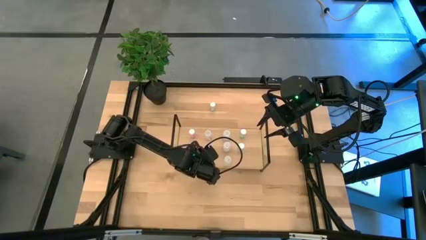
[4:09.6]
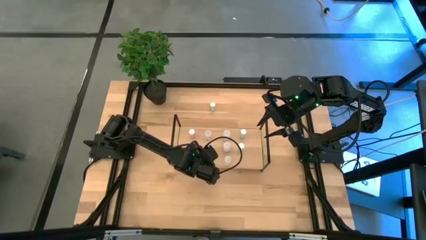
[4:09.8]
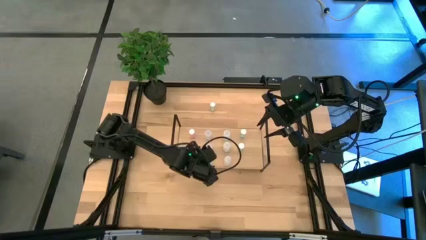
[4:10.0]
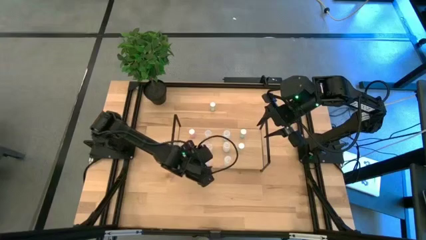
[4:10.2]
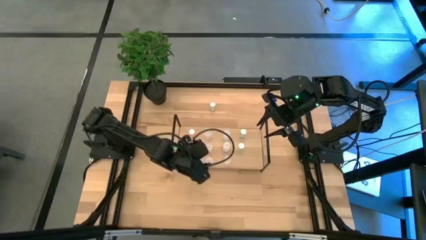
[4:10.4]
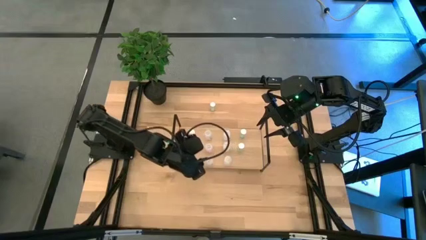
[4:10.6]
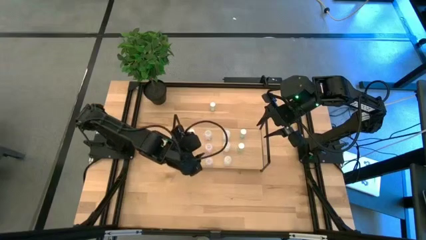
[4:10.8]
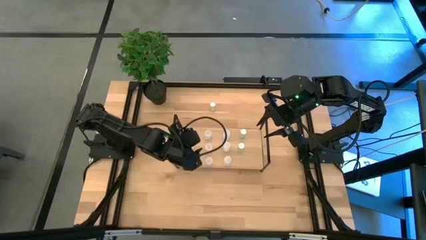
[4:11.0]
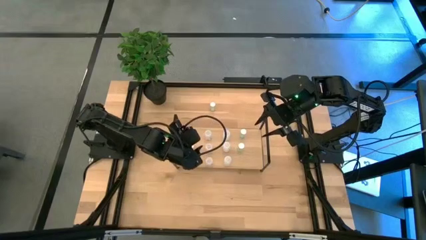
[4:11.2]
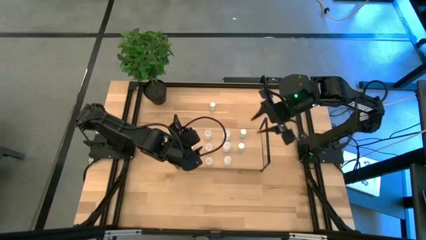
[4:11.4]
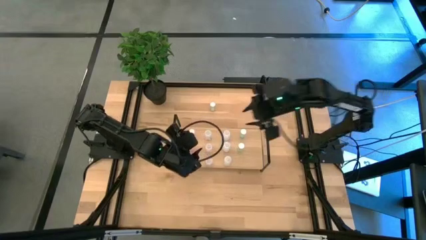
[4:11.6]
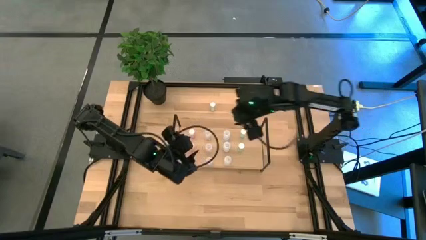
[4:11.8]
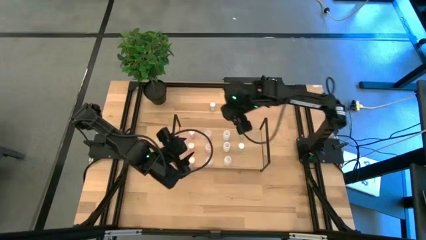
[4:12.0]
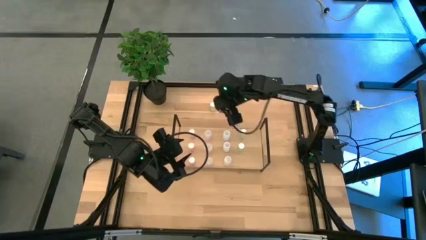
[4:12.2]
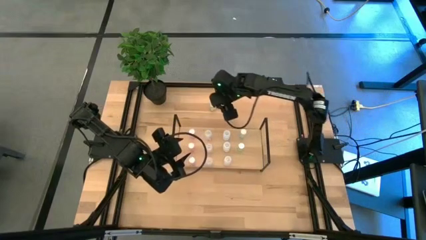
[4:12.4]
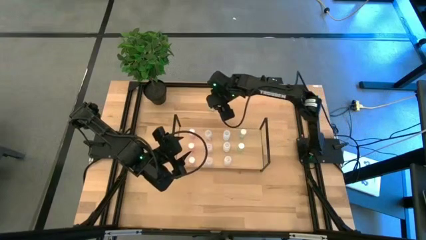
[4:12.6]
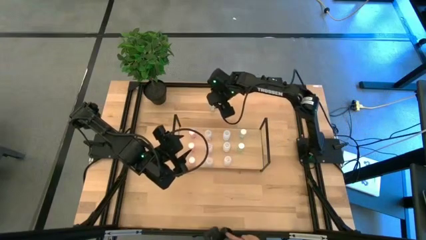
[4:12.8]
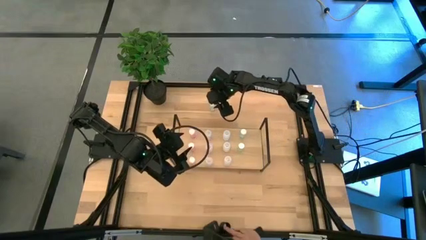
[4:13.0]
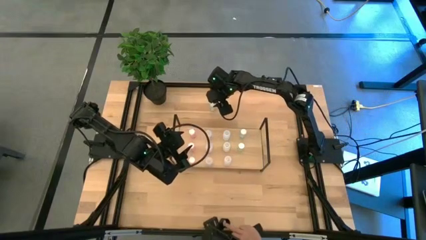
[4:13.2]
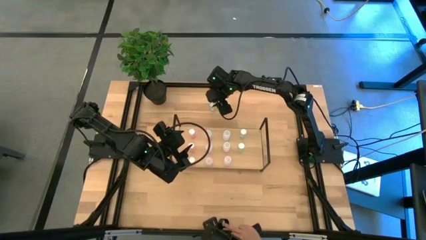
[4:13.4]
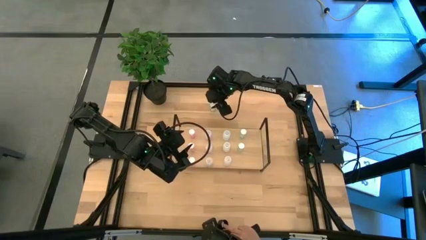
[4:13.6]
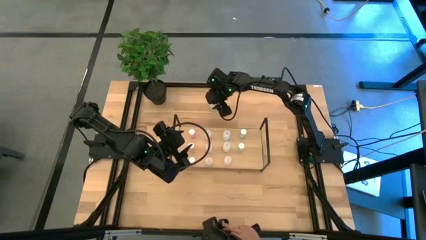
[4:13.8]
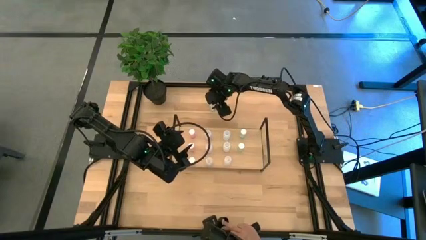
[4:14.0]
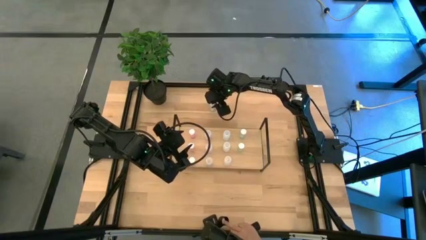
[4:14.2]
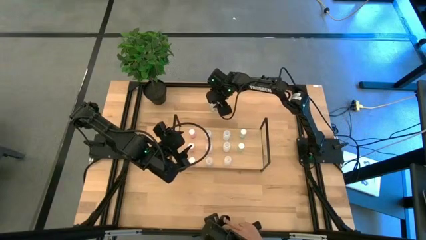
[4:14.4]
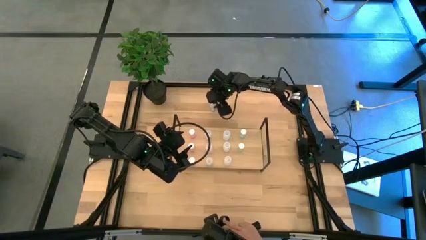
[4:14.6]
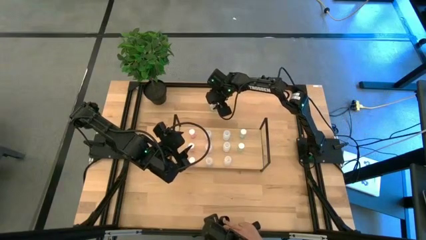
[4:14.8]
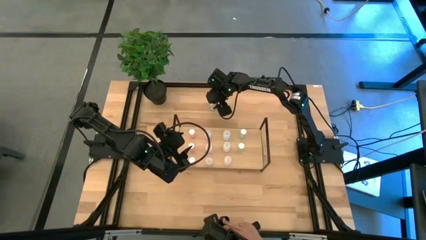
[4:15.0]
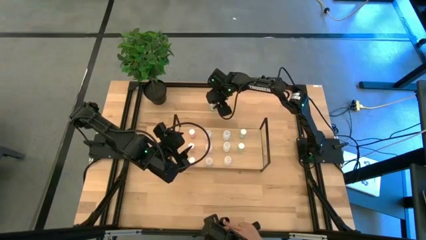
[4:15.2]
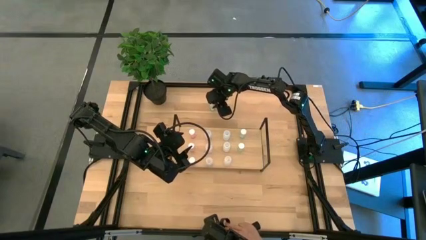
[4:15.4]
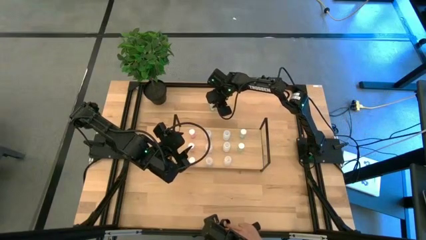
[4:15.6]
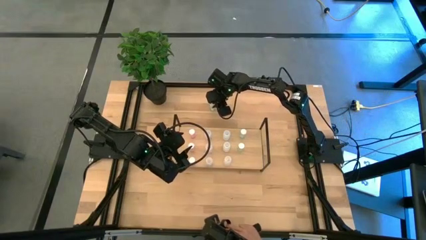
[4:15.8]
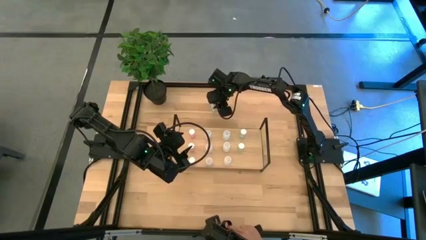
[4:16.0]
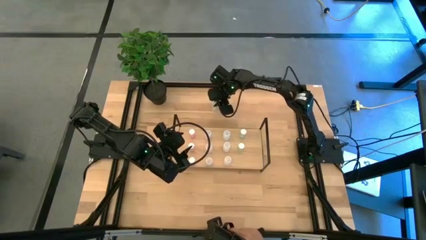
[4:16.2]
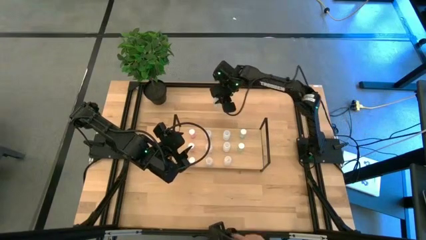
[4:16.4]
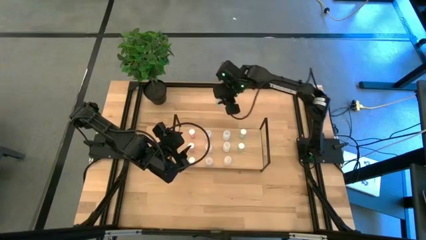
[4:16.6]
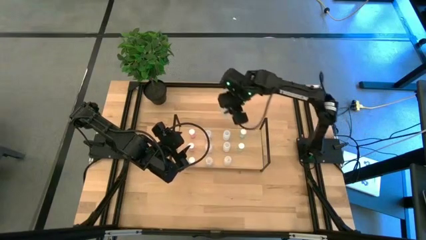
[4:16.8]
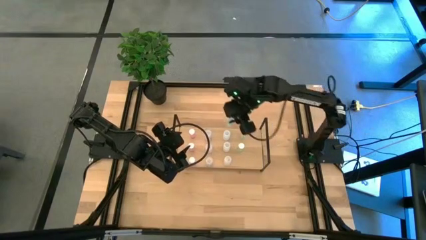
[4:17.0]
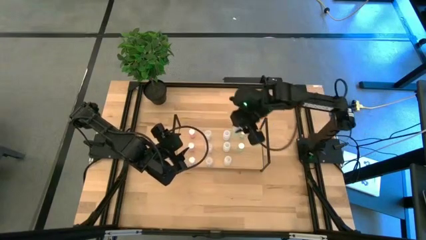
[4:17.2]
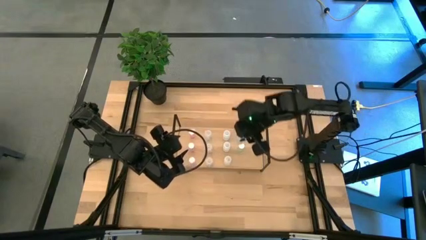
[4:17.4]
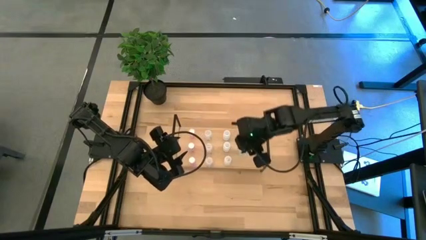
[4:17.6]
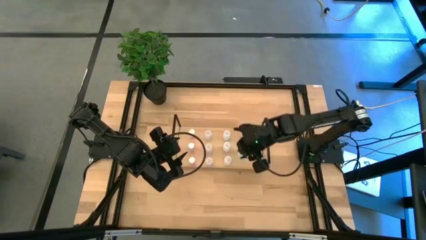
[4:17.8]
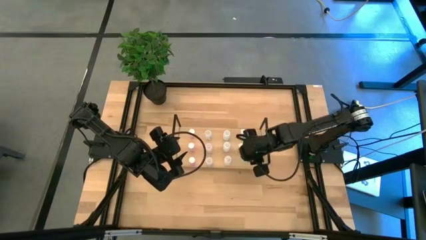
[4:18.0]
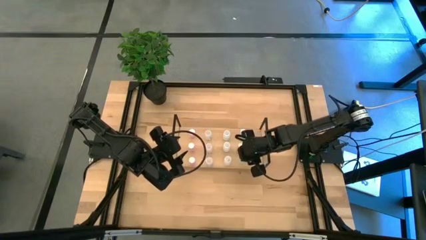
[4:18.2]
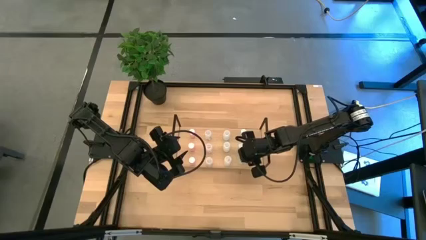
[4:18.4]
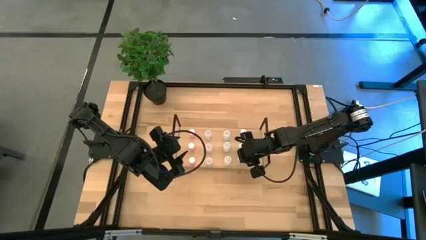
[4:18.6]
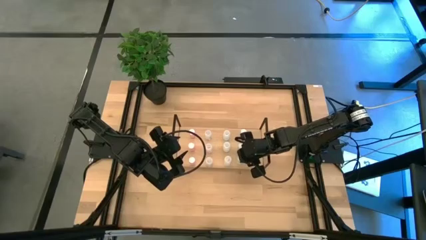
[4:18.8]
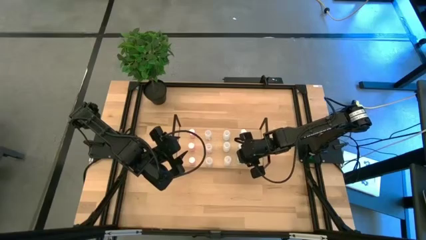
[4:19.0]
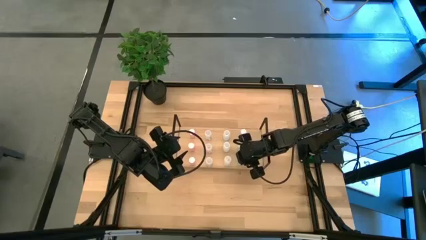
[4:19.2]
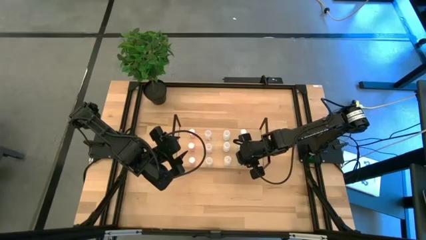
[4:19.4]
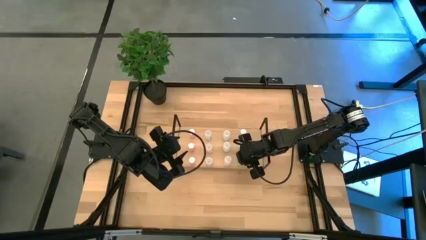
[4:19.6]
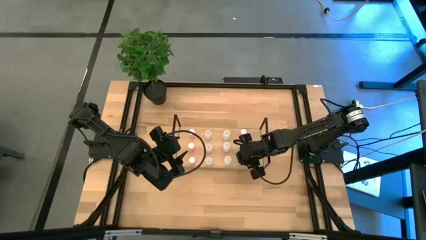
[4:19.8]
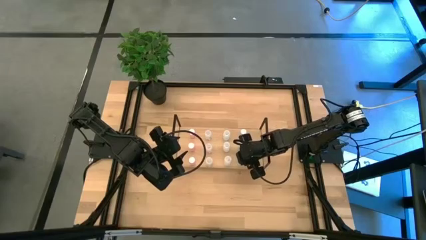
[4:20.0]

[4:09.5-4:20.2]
Task: Pick and place medicine bottles onto shelf by color
Put the blue pill bottle on the shelf aligned with the other blue pill bottles

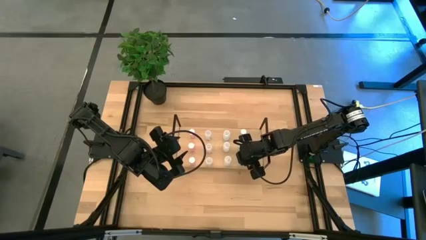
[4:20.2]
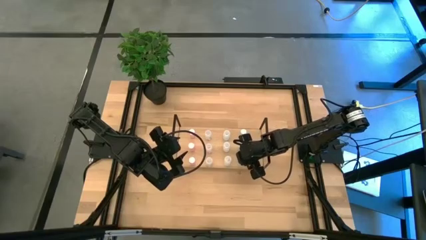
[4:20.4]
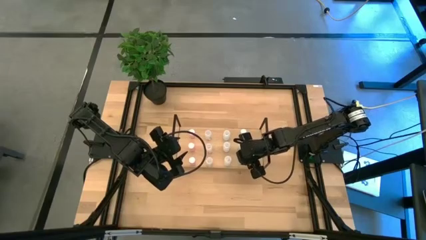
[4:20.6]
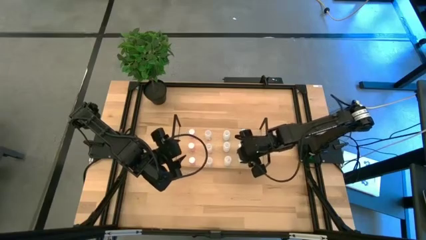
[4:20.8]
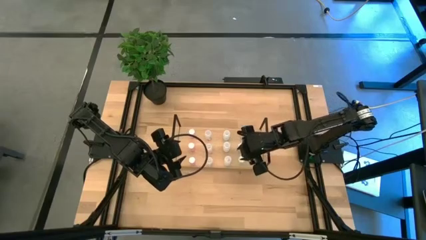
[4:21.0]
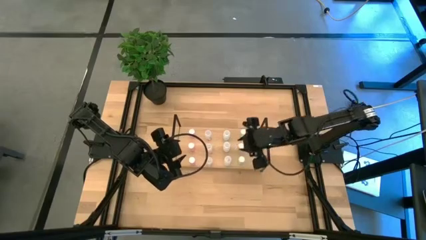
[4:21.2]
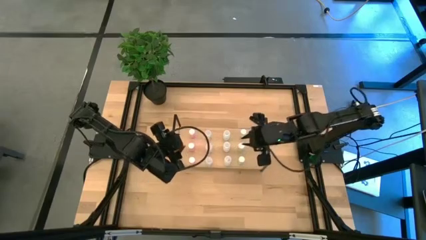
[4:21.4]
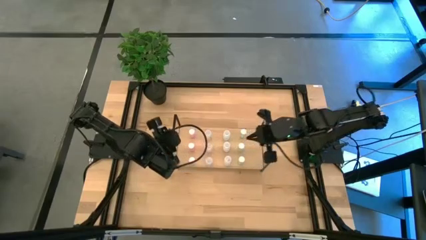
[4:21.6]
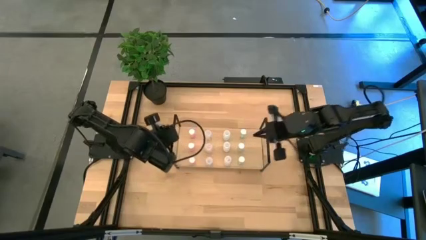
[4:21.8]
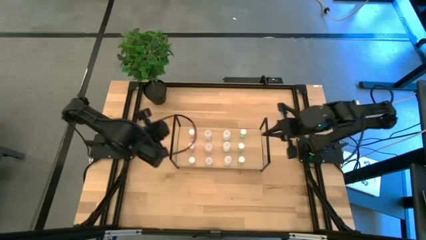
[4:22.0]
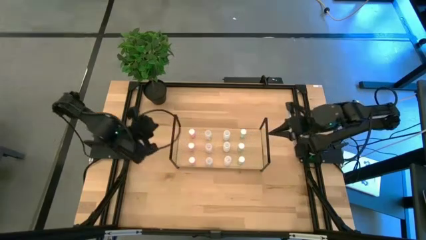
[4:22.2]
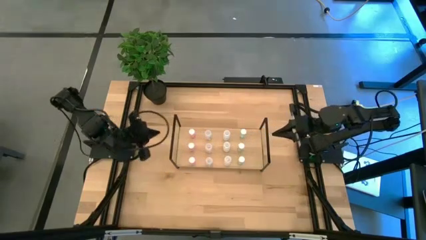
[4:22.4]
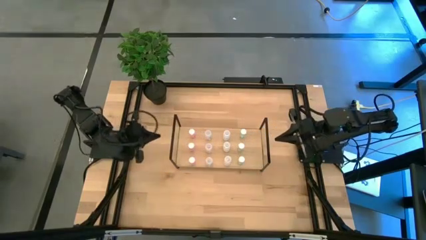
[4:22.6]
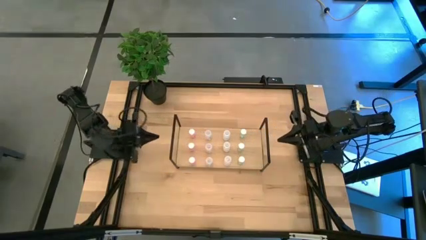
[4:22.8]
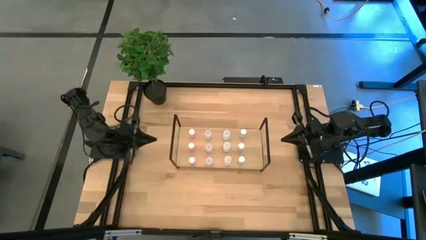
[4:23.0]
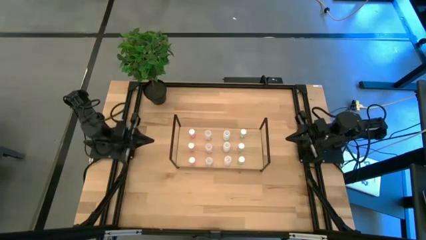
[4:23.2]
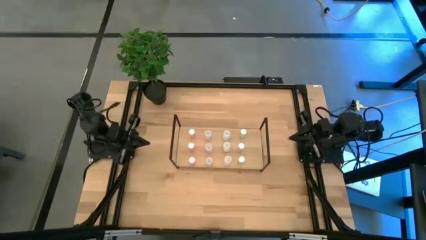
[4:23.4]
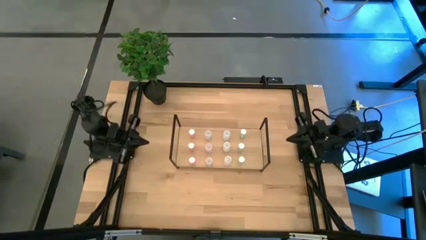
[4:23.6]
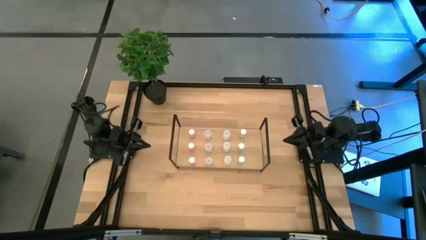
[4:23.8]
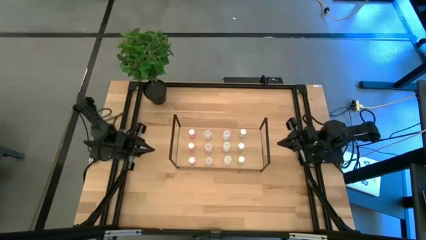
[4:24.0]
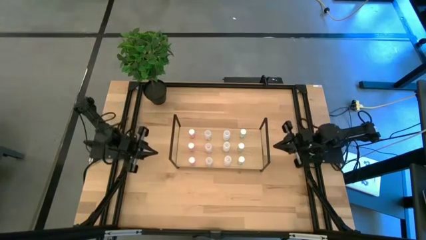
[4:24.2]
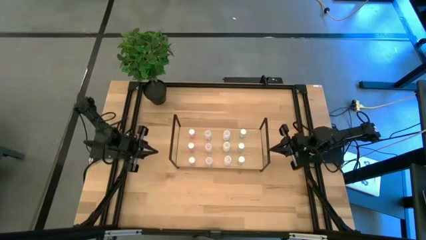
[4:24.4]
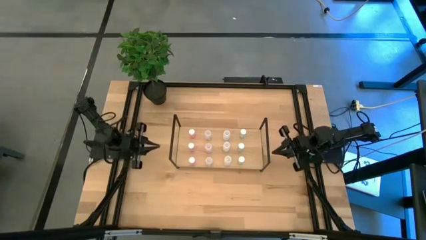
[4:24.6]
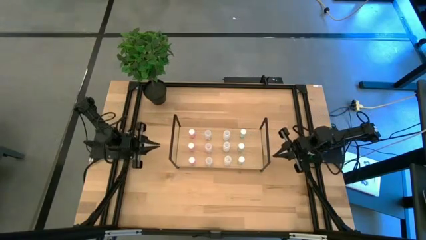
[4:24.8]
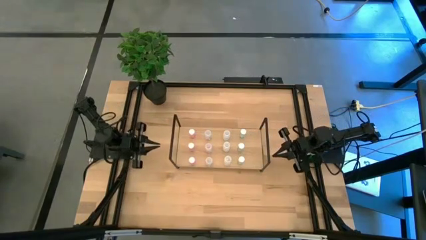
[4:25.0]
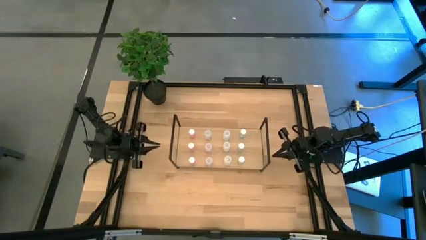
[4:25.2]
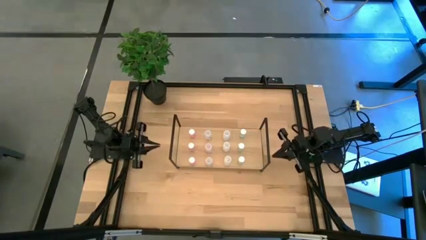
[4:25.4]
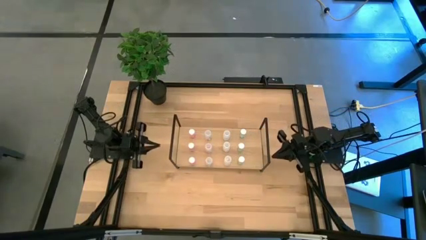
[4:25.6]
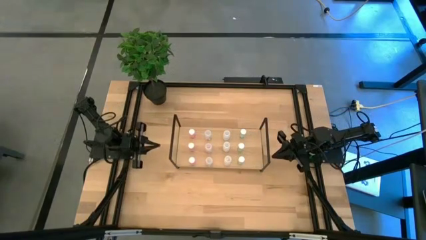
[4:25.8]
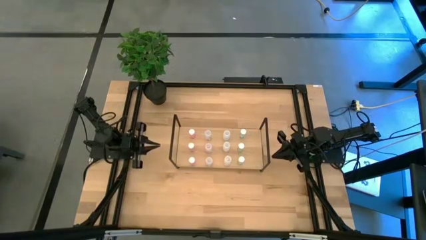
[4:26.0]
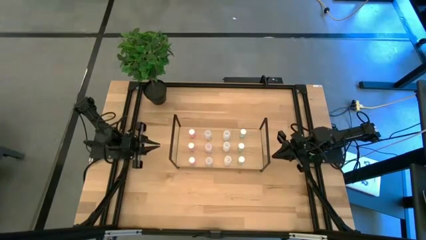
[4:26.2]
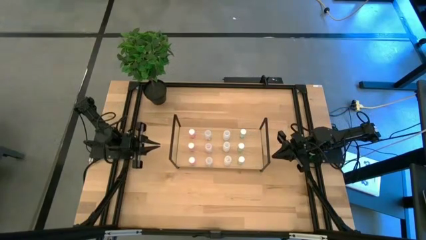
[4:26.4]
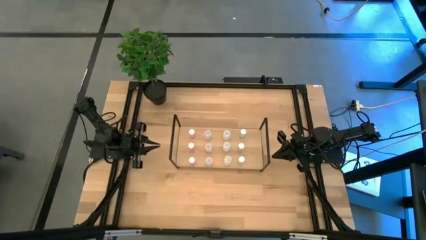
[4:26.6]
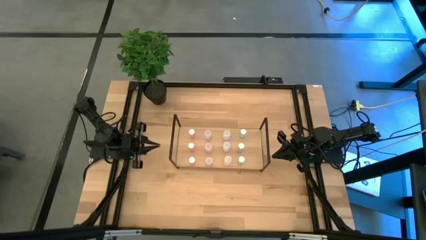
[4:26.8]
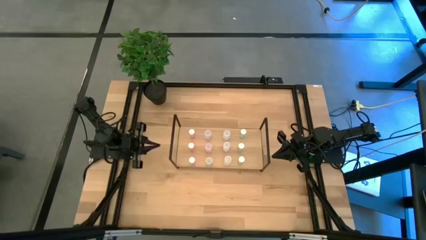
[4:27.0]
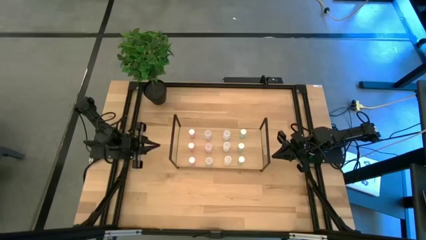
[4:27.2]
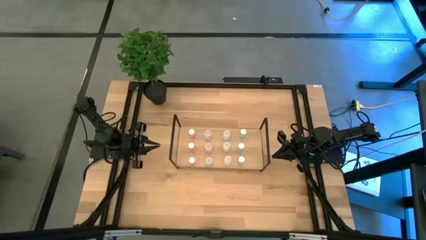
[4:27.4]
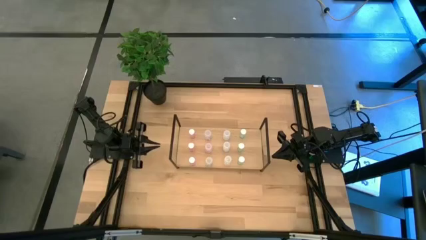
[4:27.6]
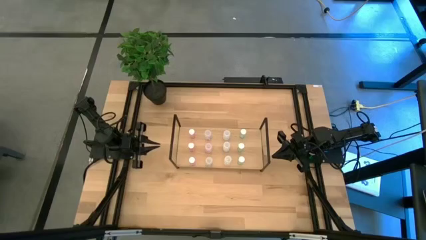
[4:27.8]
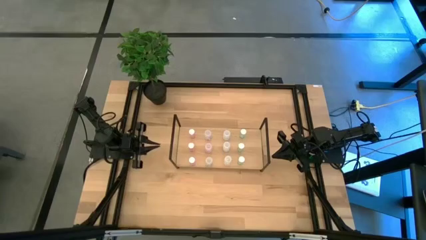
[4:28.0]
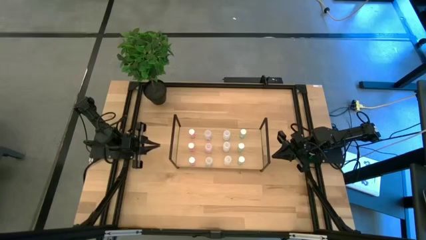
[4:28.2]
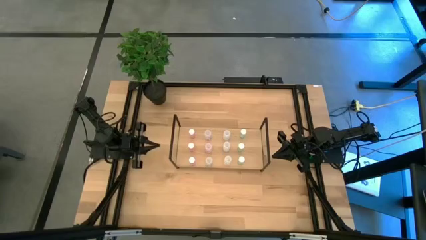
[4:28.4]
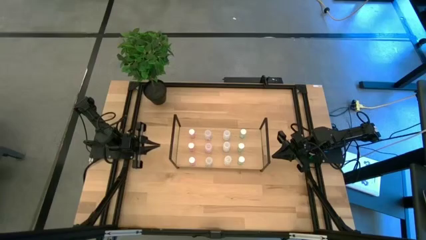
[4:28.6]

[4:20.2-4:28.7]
Return to Home Position
